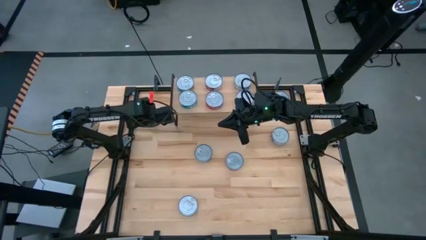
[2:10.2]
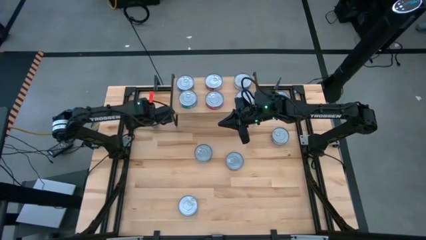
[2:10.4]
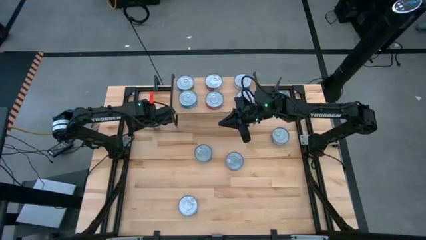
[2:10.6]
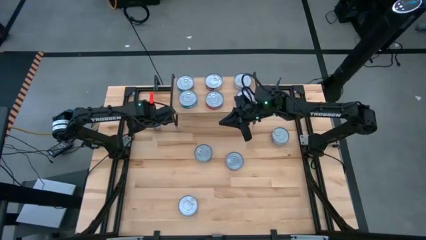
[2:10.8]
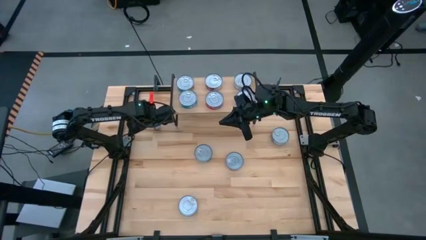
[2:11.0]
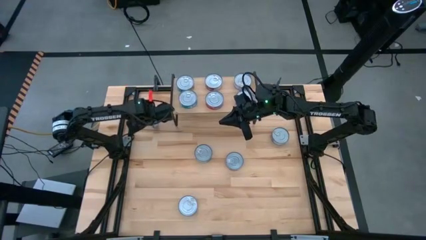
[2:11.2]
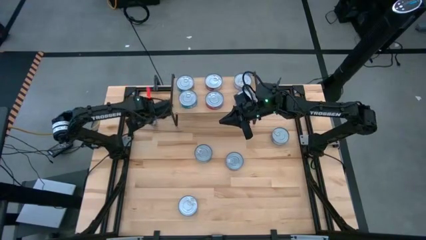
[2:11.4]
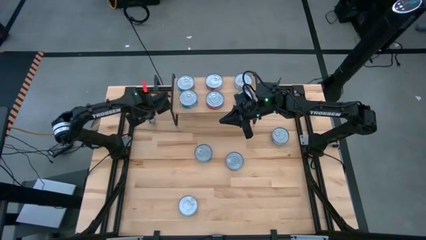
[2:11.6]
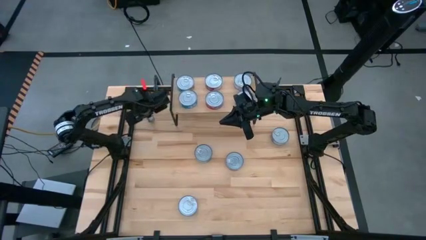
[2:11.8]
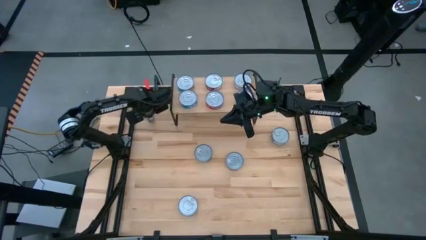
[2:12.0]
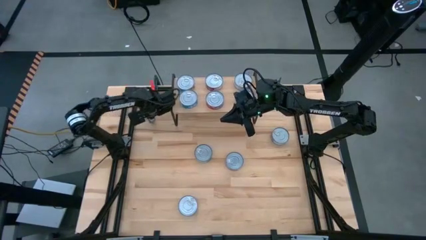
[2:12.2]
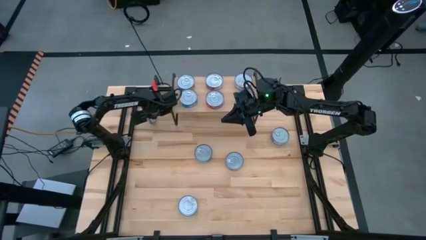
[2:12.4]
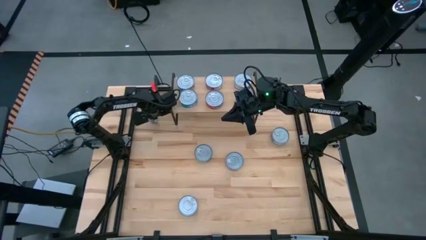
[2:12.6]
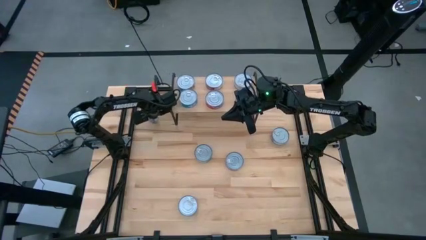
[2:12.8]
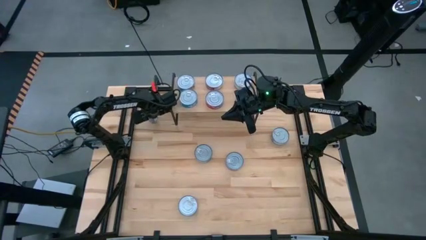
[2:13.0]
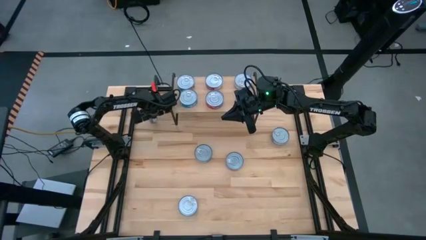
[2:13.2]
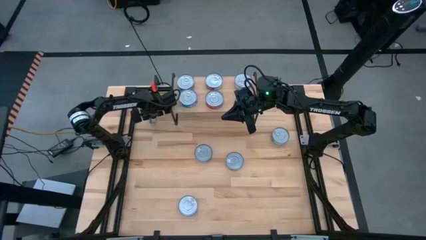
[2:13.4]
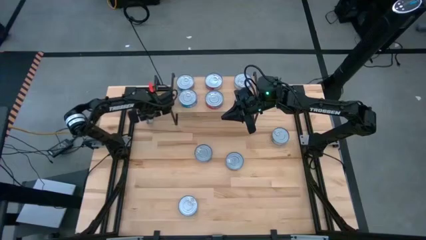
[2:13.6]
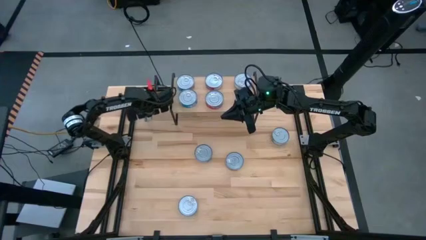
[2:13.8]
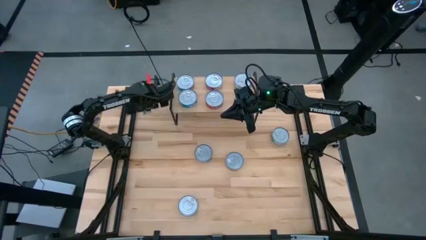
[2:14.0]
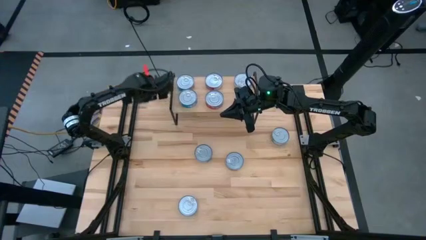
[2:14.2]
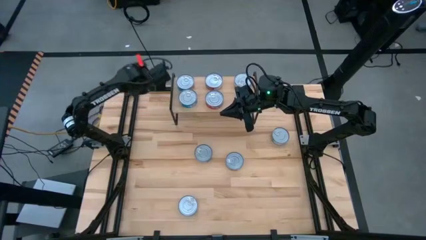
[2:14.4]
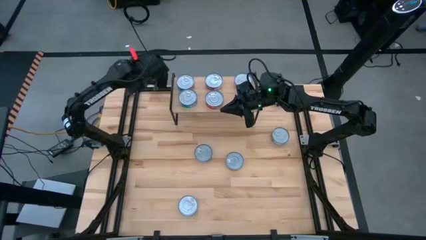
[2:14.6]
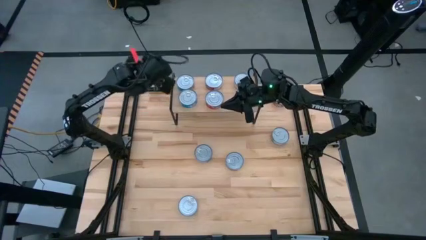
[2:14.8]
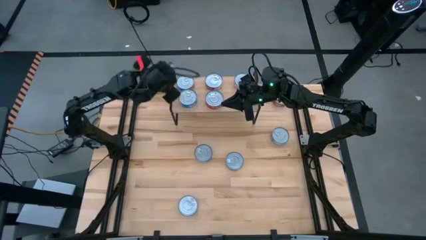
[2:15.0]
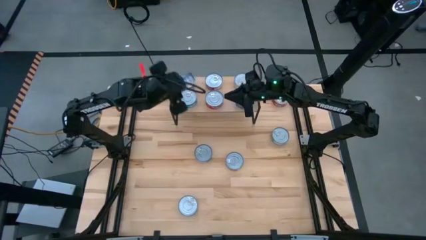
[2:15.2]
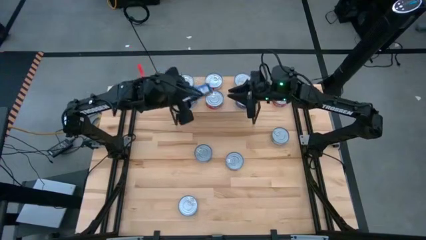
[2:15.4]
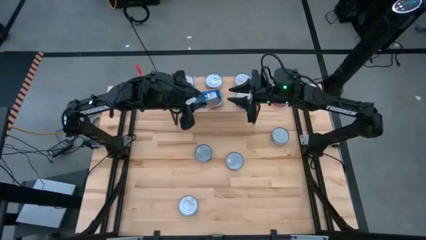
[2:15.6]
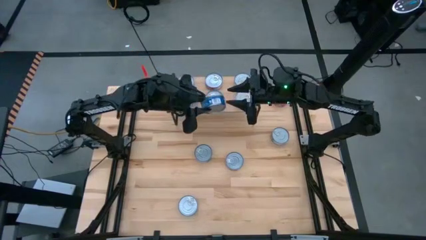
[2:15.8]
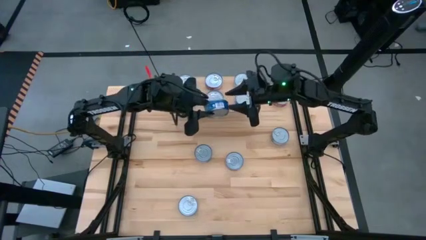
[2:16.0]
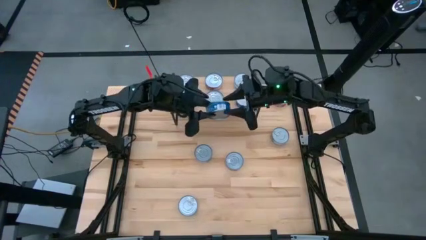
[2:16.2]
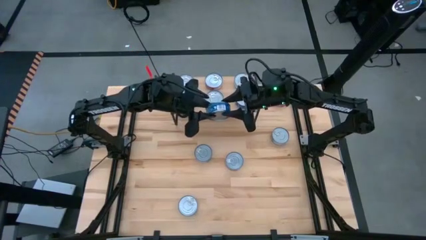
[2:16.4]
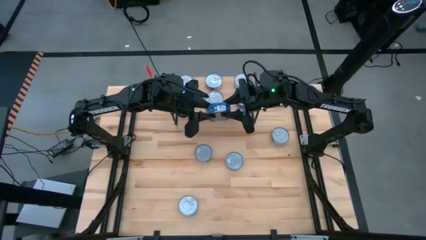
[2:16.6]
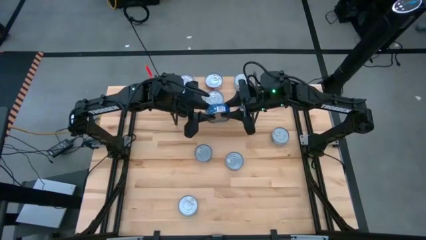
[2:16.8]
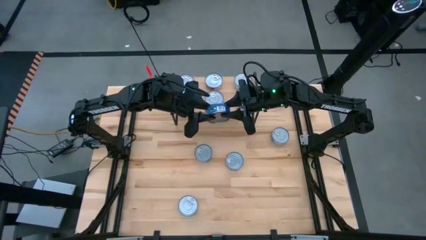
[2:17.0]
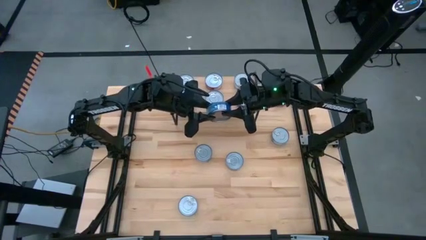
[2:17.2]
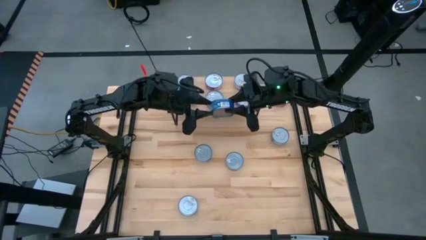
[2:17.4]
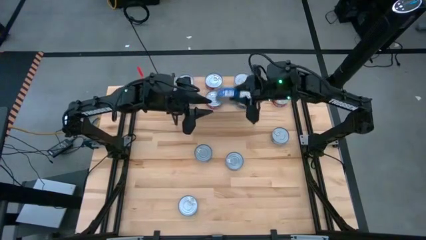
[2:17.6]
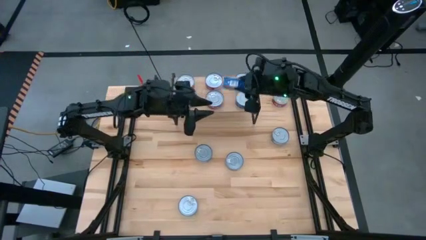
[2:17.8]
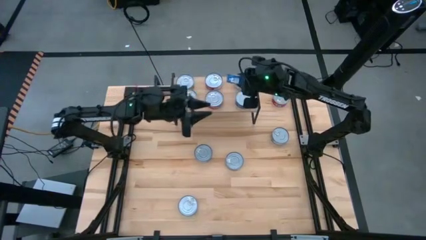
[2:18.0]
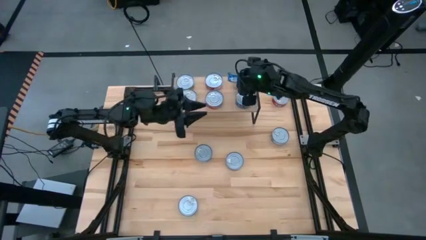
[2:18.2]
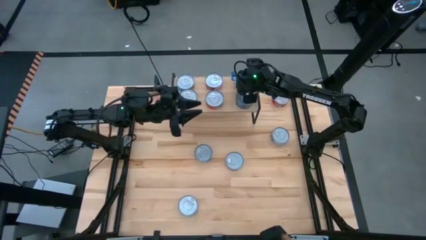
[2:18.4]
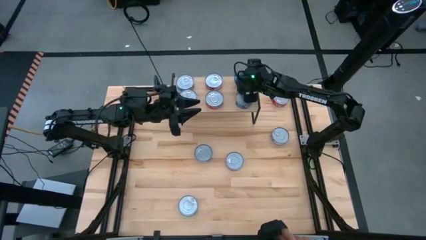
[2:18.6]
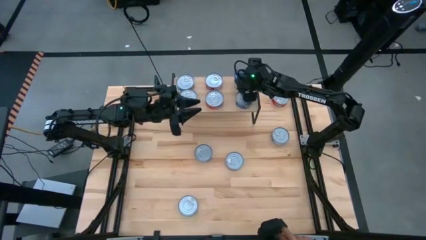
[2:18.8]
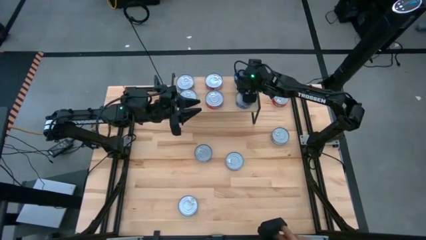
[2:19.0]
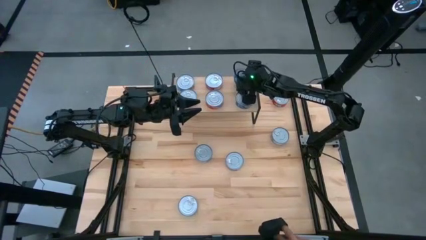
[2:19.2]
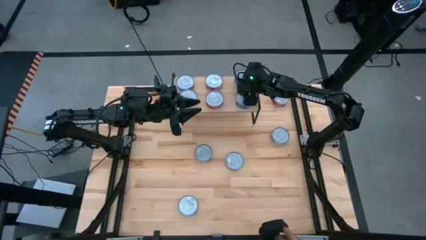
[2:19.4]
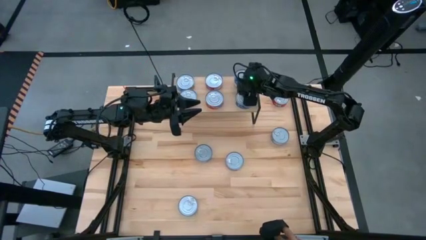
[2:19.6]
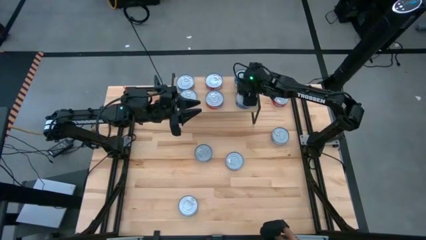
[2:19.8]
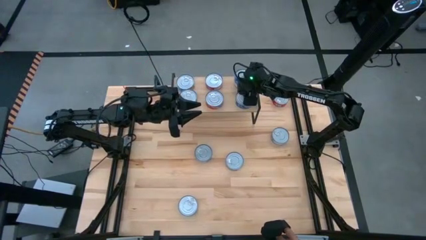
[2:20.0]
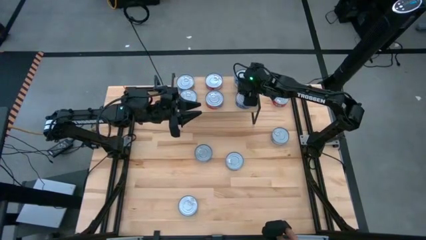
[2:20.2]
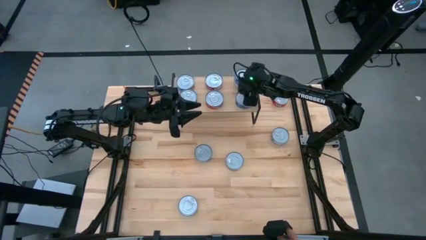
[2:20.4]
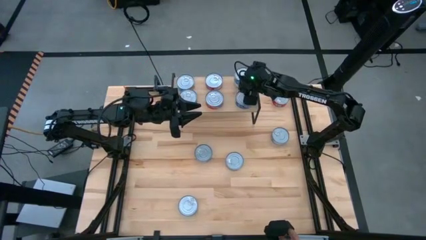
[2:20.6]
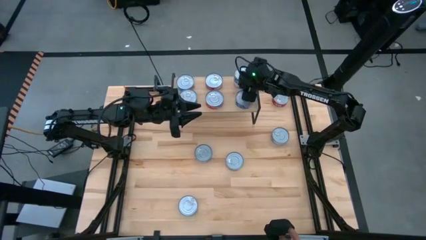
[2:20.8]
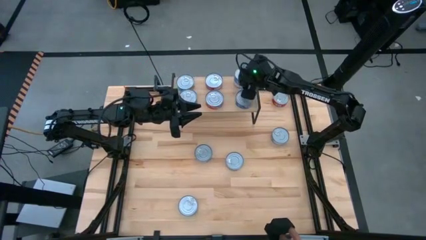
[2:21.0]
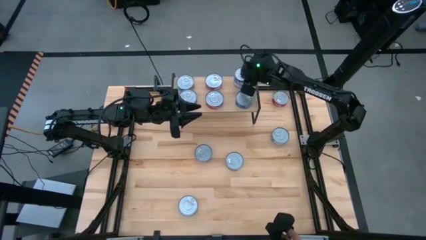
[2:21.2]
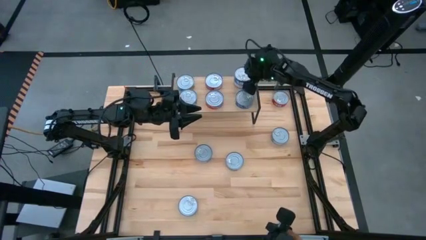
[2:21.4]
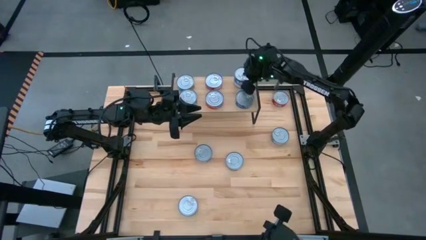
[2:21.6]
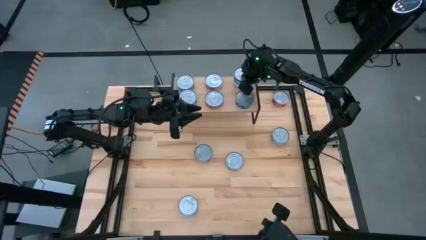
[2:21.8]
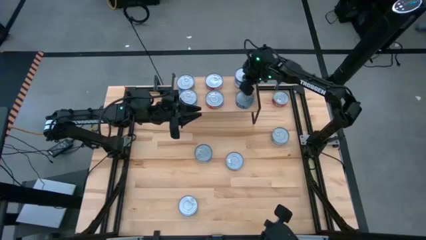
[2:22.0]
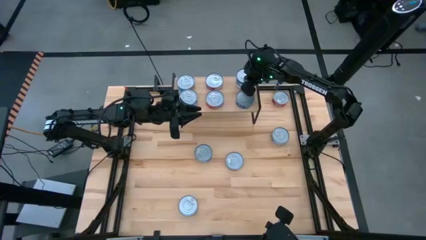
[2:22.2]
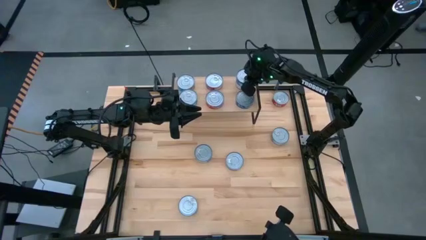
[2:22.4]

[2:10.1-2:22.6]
Task: Stack canned seafood by type on shelf
Stack the top blue tuna can on top of the other blue tuna can on the shelf

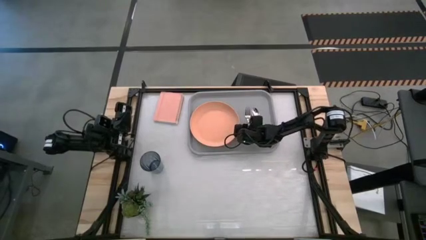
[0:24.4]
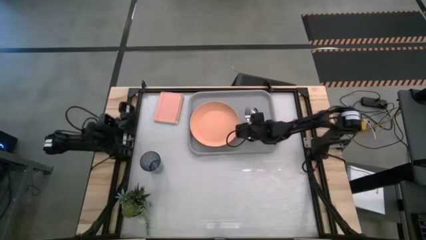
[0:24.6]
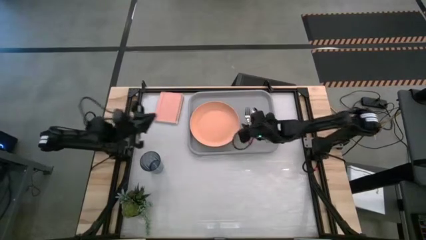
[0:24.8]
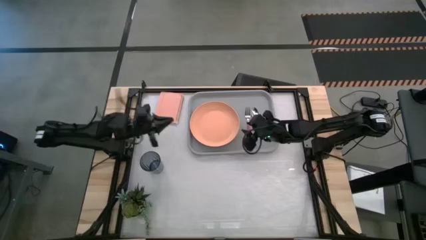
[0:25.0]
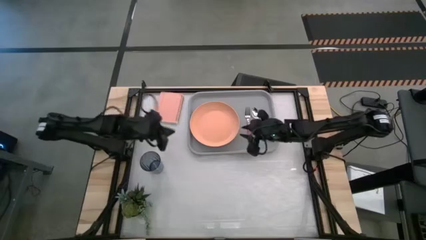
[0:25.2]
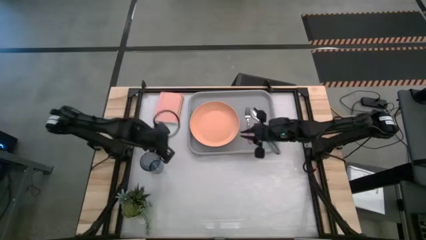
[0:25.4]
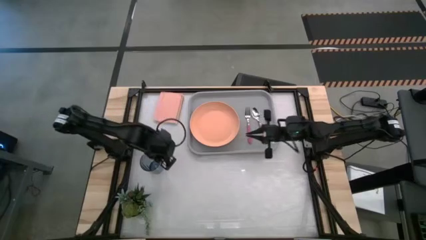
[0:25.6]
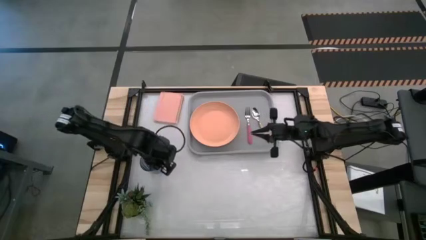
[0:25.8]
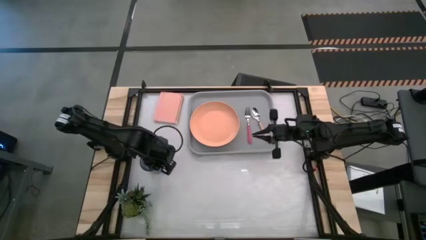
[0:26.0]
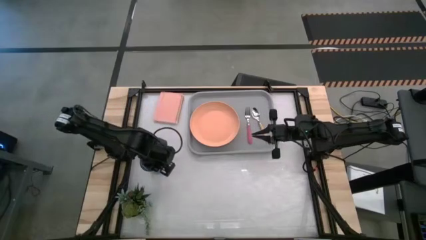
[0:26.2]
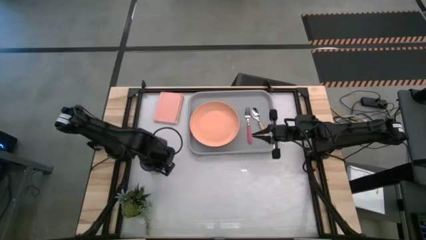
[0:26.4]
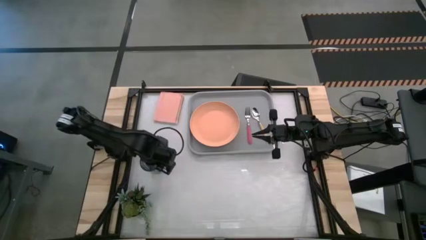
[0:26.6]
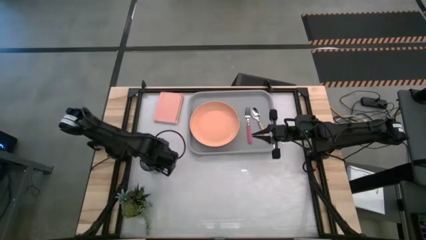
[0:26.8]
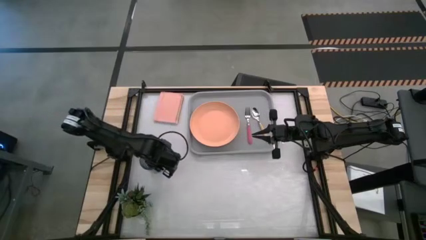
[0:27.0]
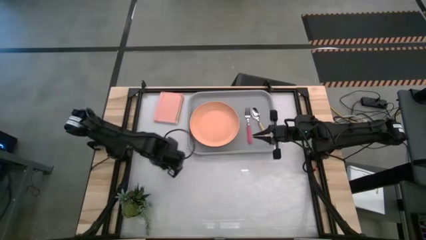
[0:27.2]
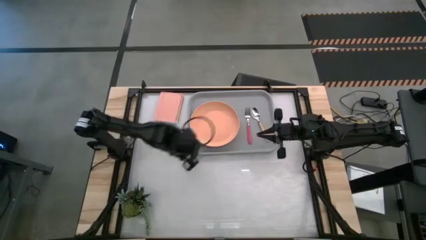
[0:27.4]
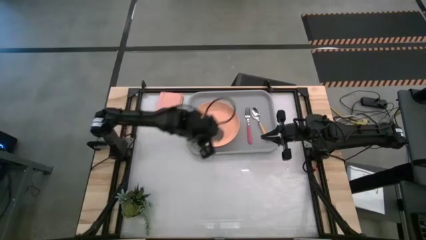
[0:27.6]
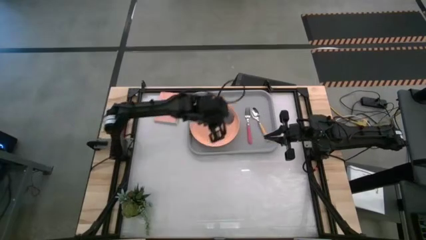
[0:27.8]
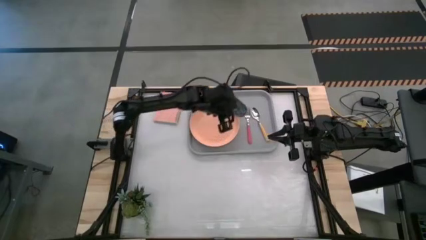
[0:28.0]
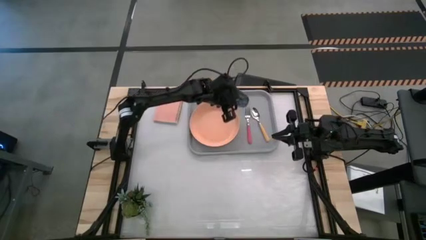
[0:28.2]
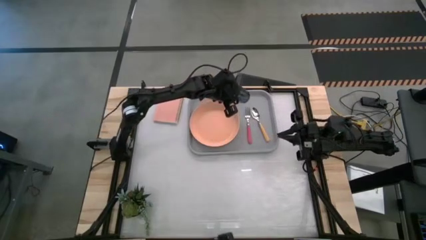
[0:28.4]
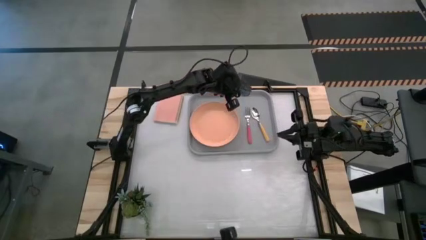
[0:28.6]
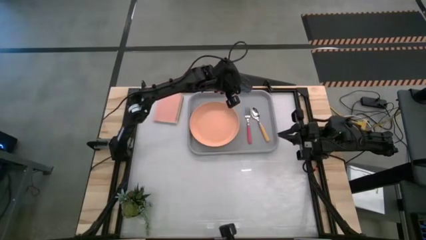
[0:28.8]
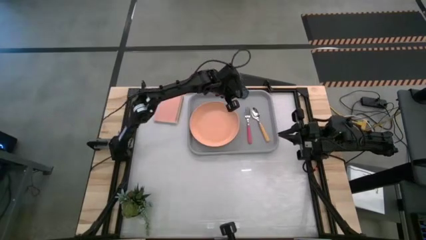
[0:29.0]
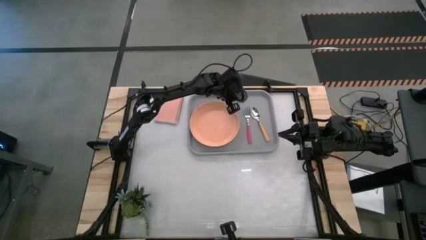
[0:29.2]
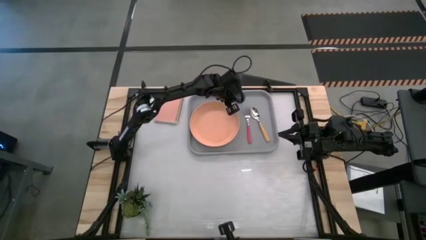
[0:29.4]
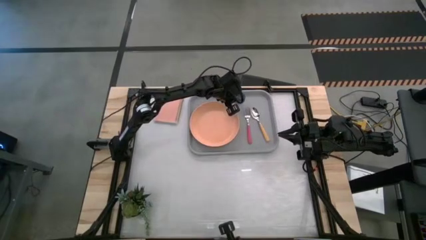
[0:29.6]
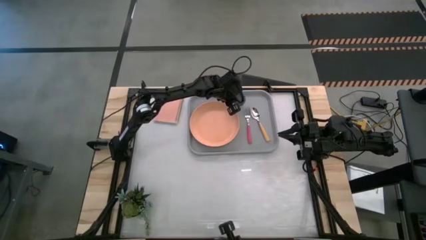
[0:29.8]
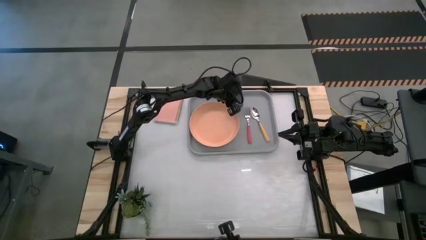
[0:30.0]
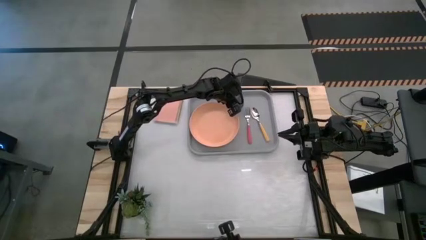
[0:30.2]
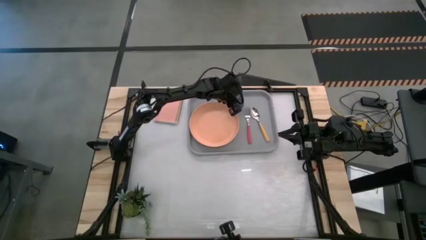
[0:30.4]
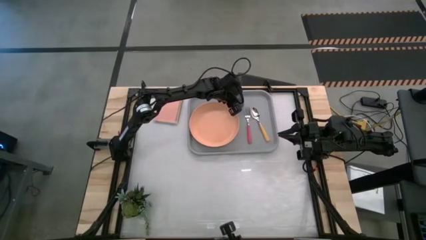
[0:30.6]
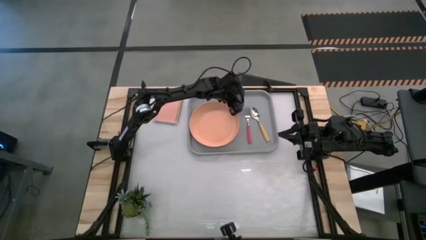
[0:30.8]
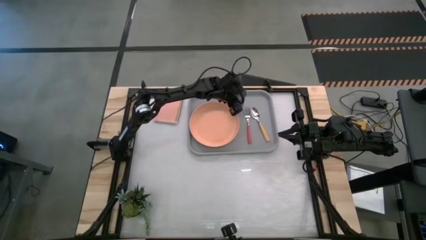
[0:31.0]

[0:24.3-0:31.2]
Task: Pick and place plate/cup/fork/spoon on tray
Put the blue cup on the gray tray to the top right of the orange plate
